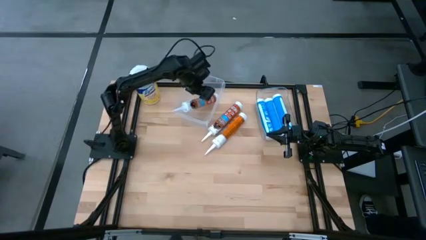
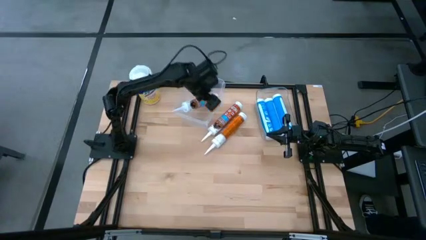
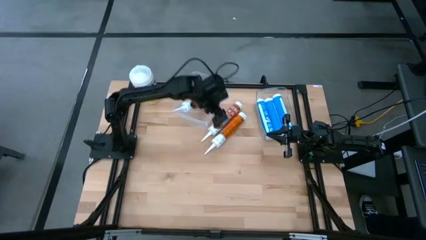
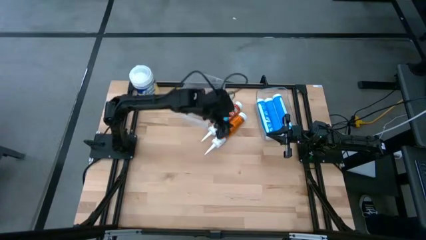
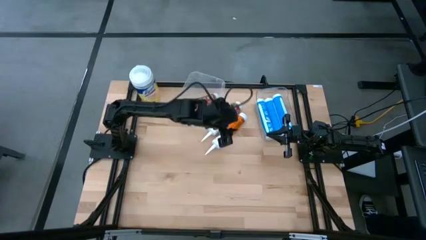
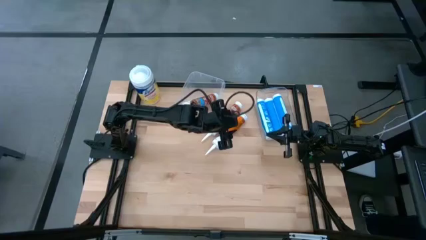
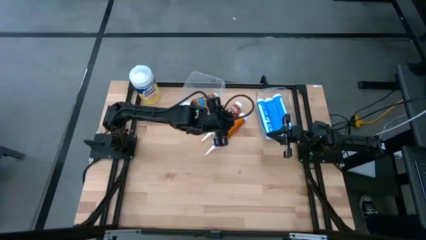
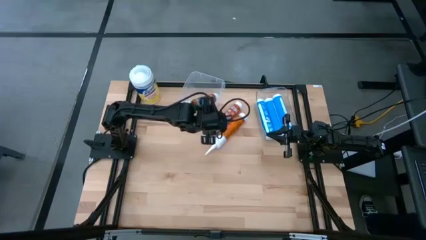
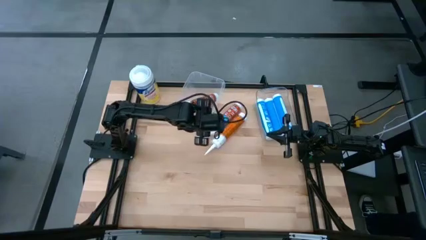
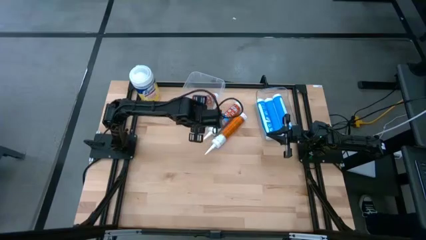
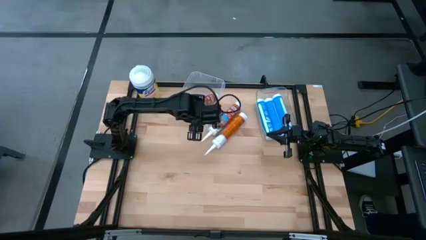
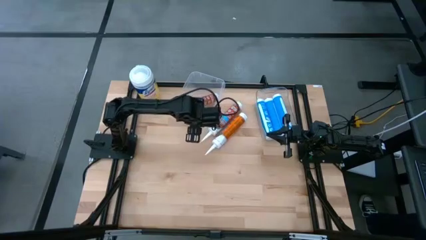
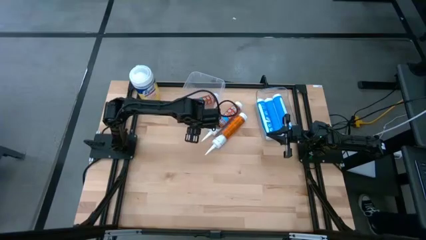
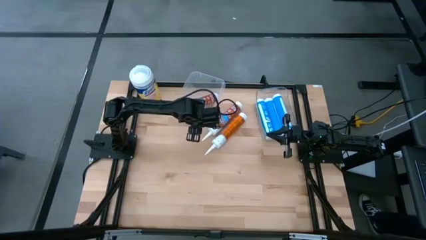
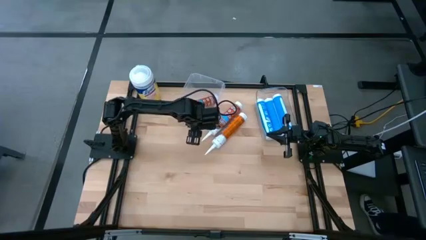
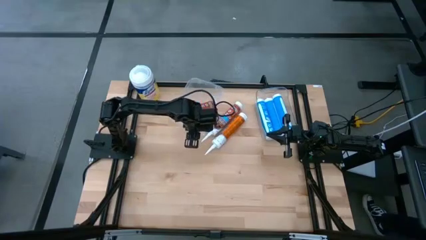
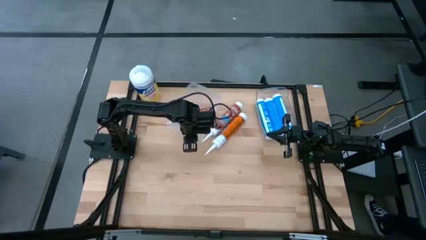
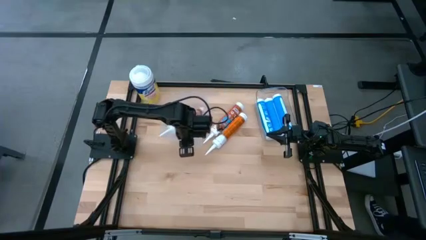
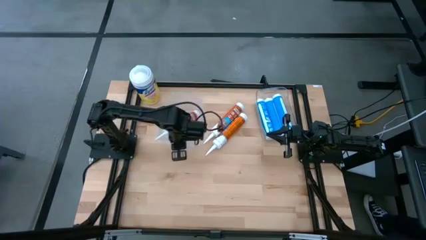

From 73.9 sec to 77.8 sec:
Task: Pick & place silicon tubes, Sealant and Lysol wipes
Adjust the transparent container

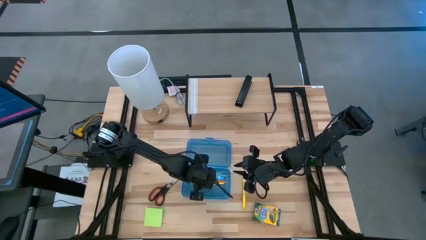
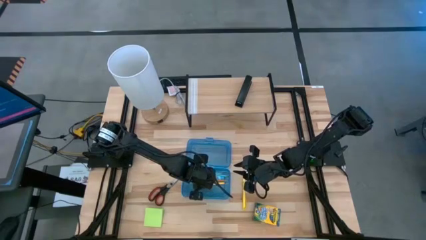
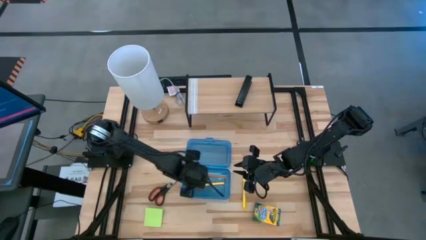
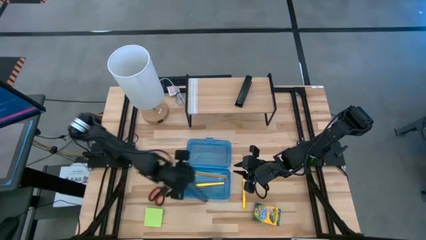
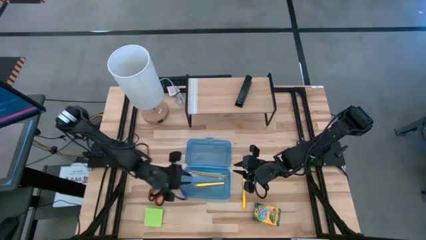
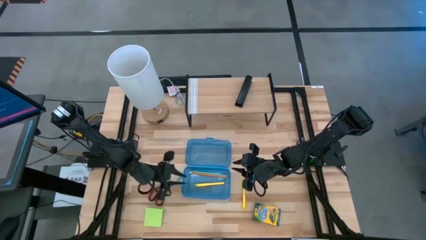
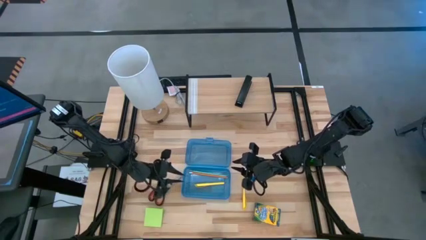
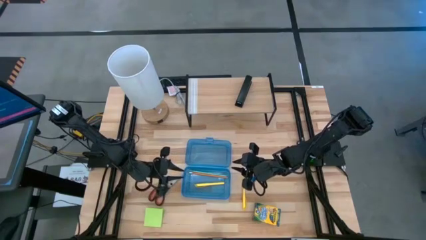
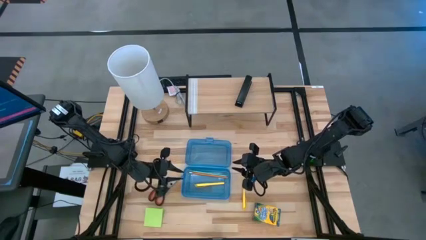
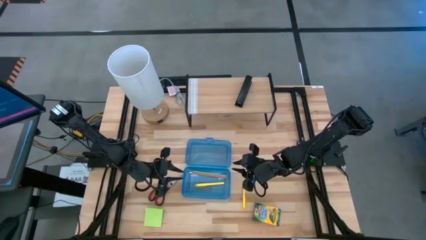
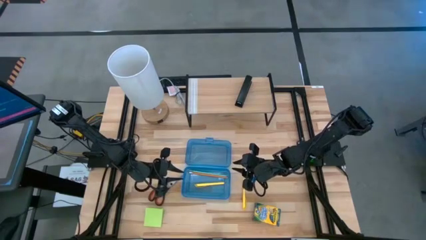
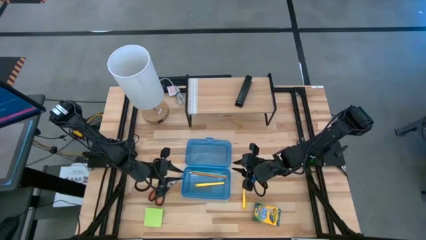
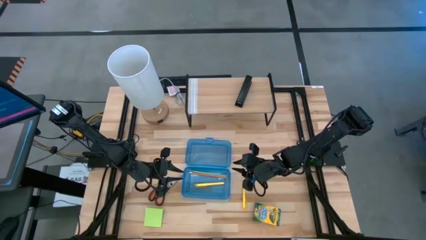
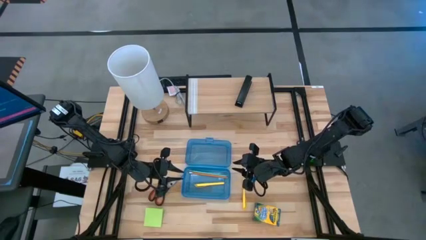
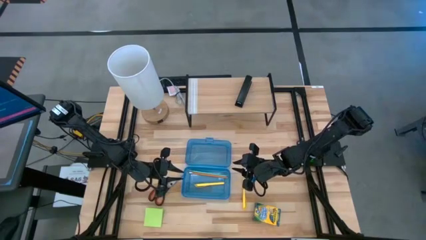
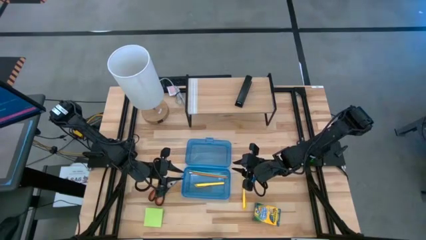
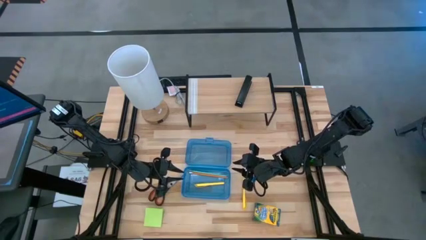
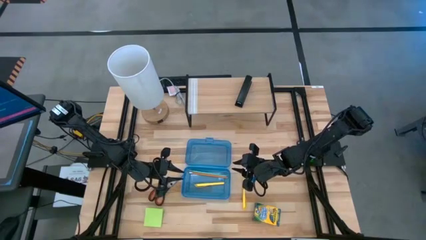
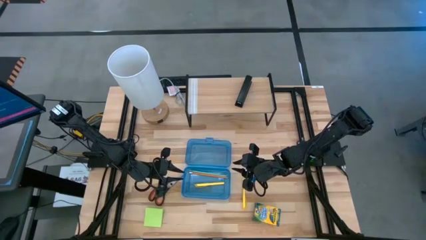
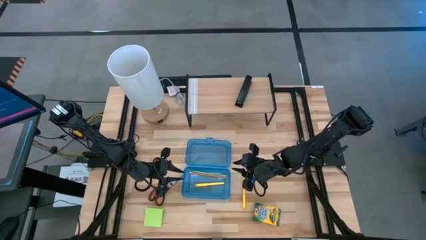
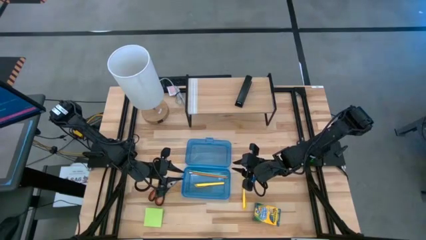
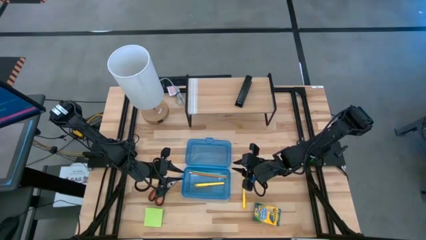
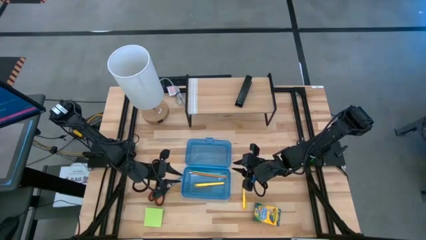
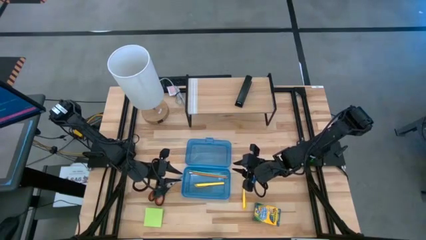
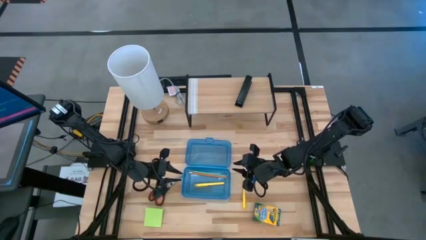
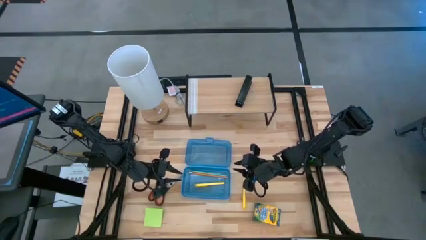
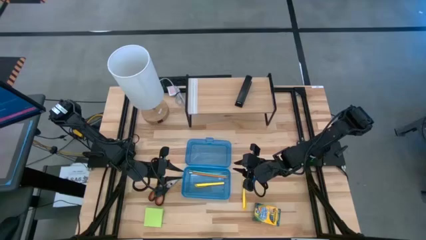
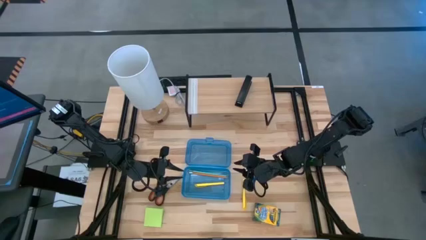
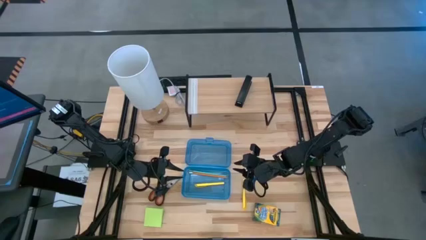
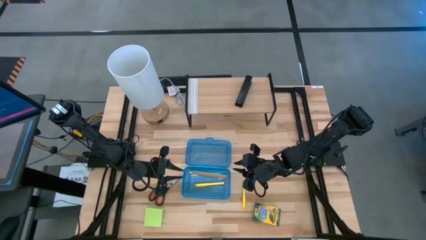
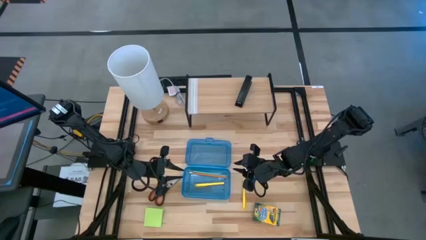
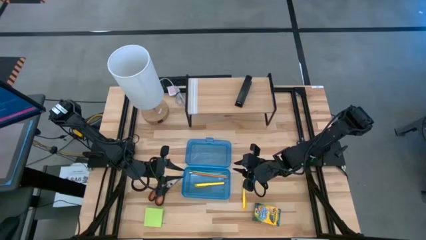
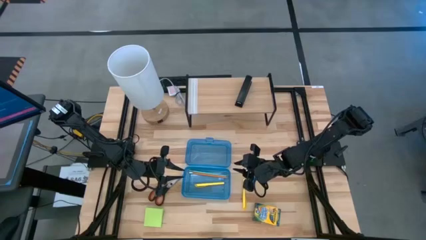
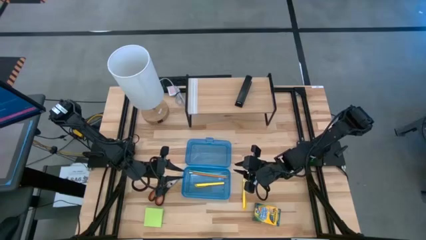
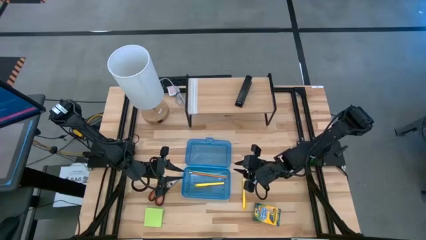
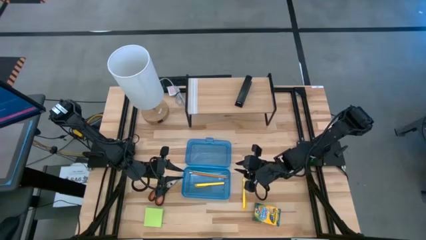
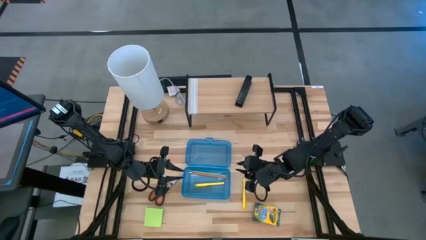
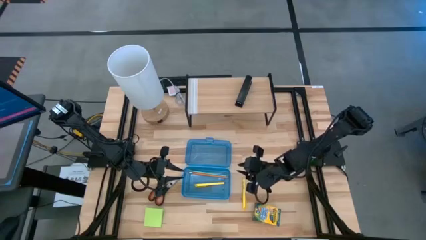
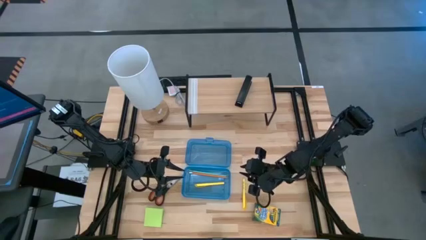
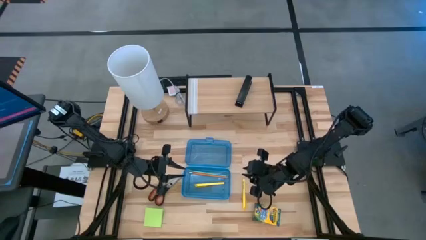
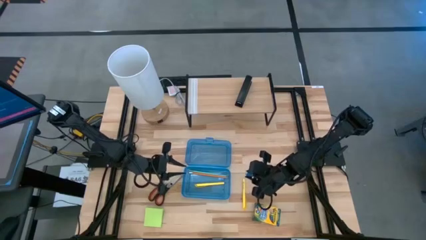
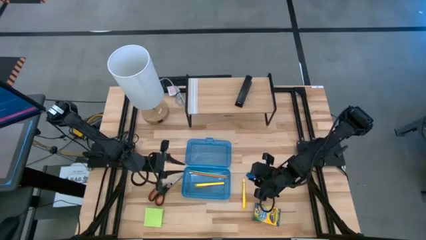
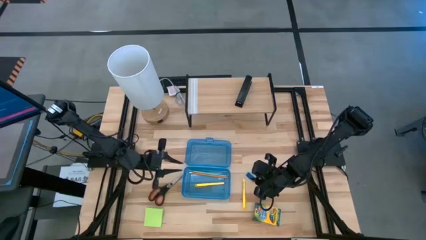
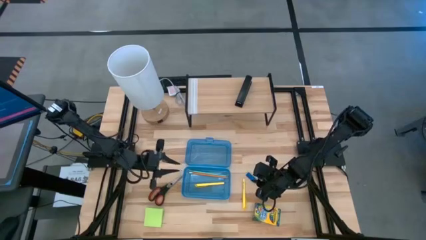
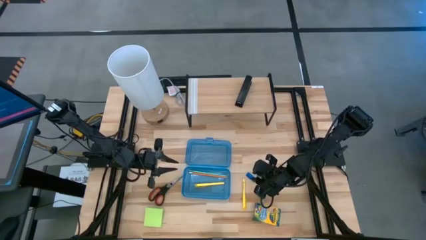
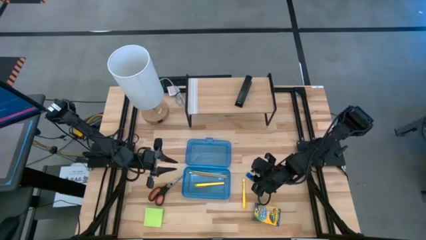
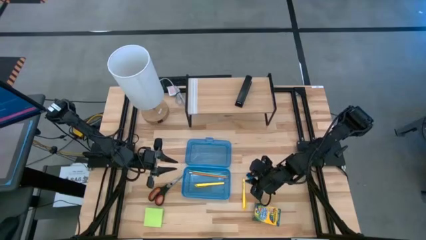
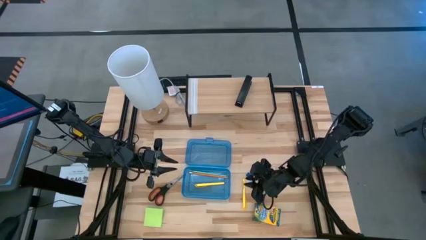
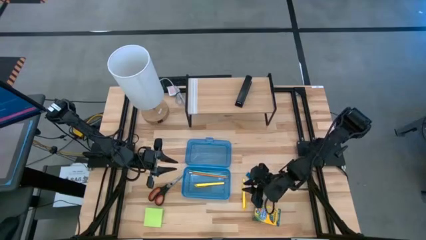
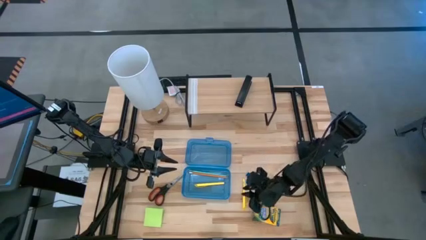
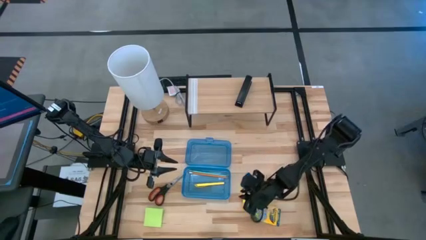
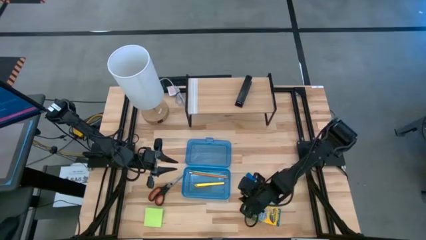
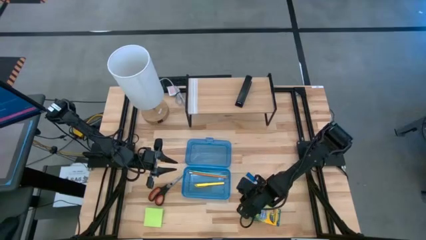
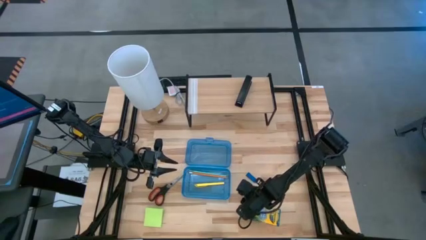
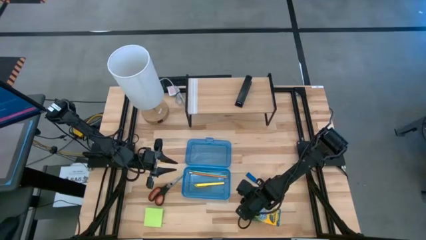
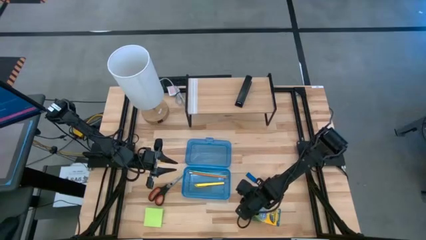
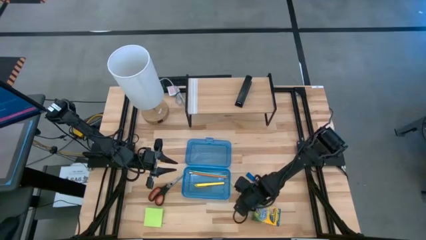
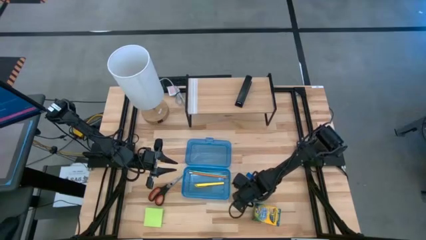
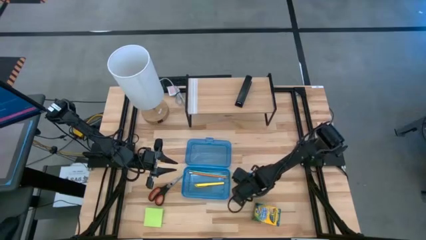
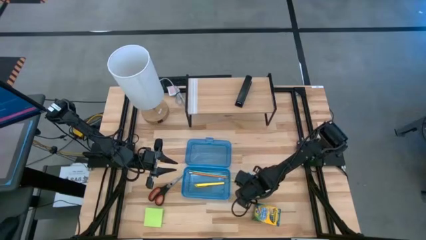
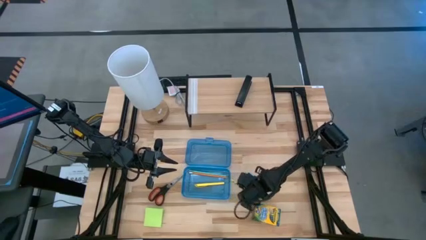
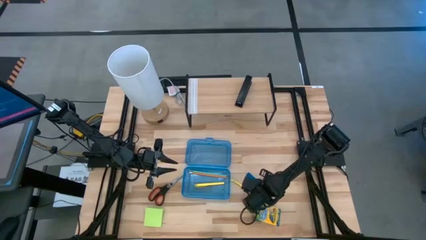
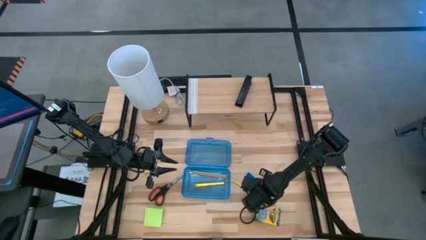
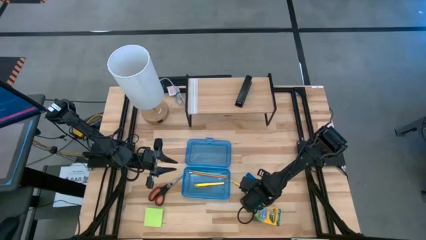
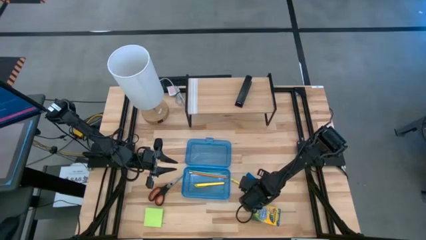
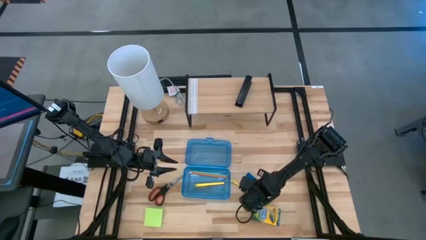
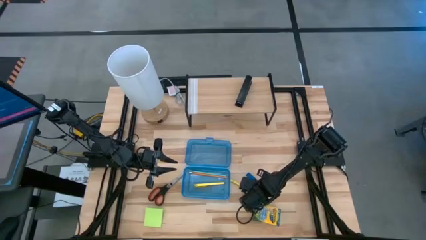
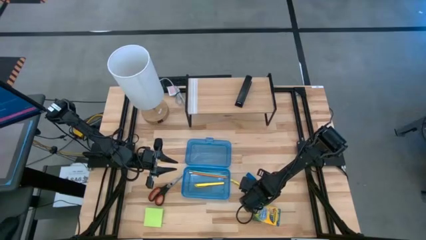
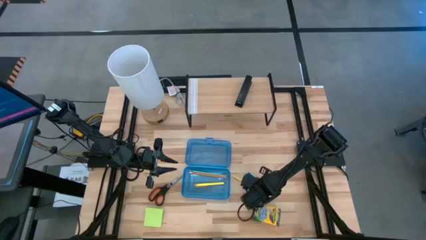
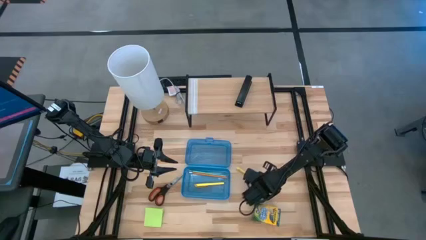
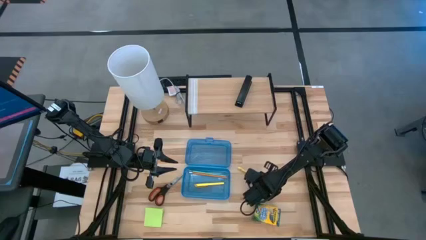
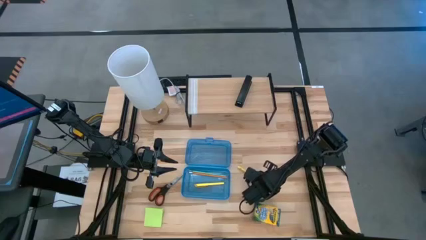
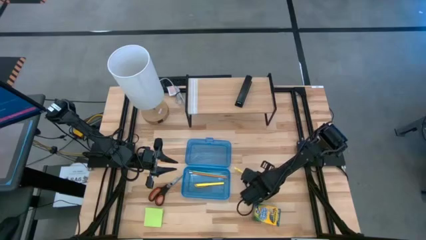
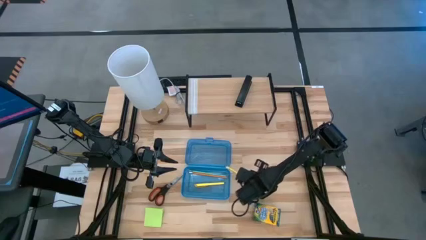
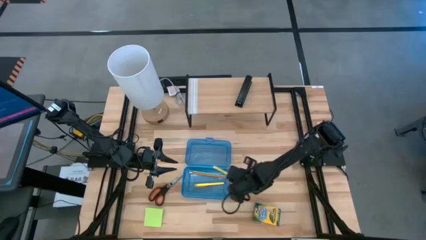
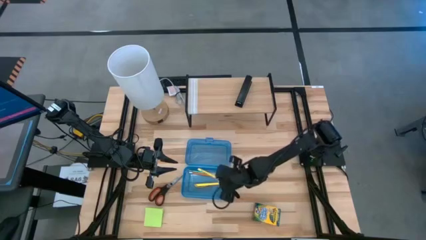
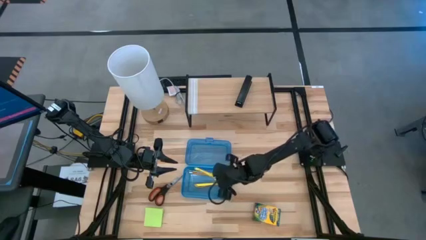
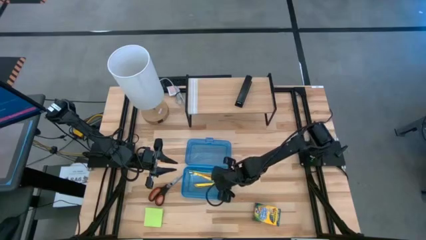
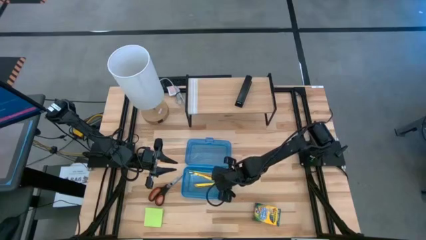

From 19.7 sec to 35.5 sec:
Task: Pack school essentials
Put the yellow pen into the supply box
